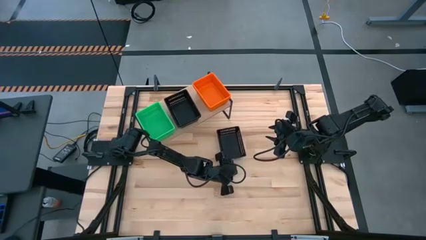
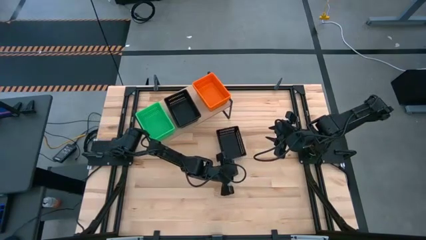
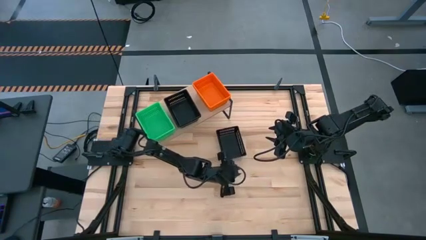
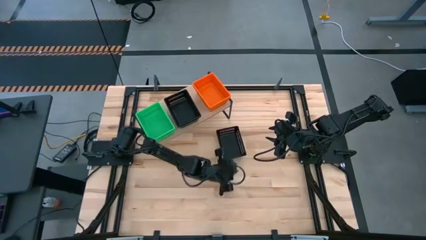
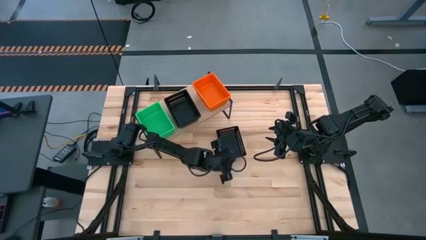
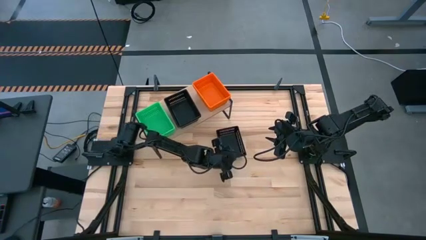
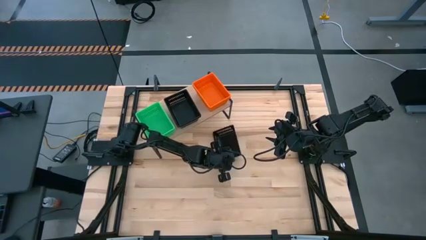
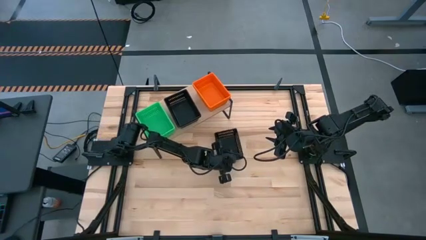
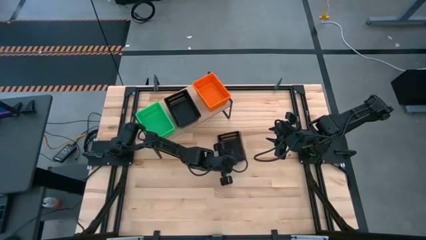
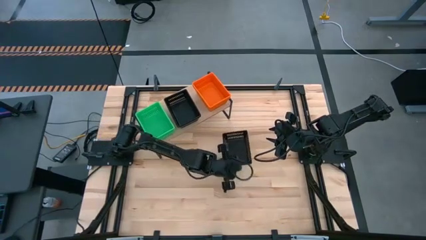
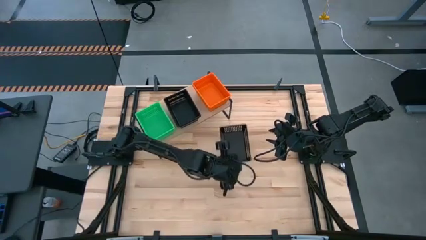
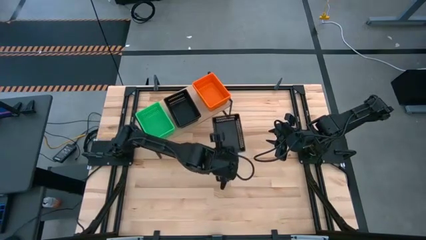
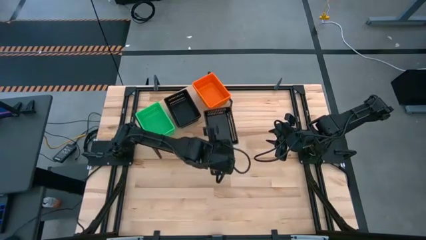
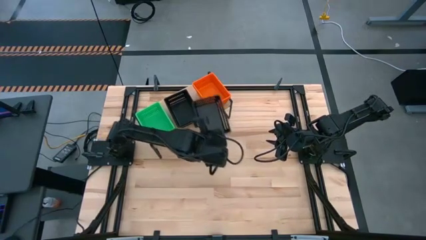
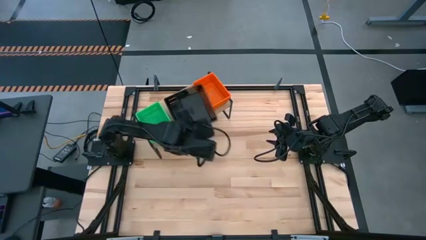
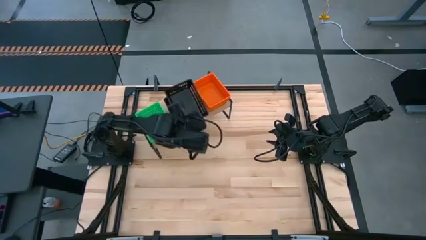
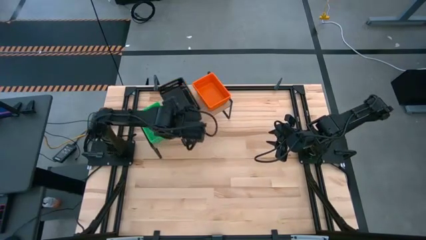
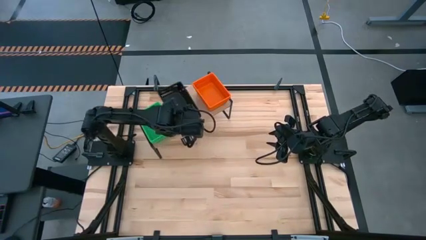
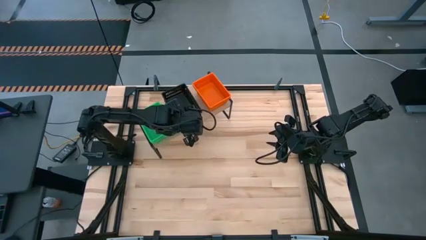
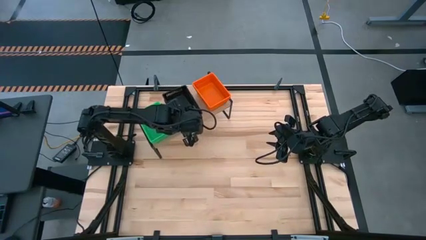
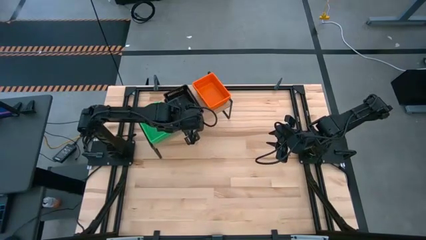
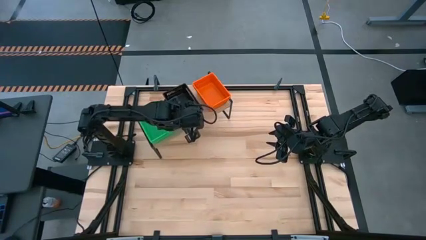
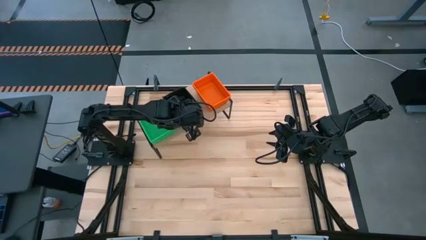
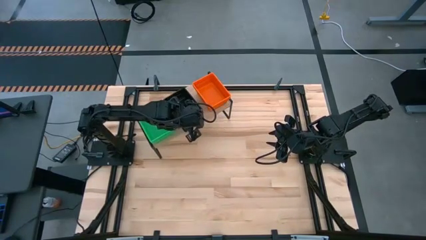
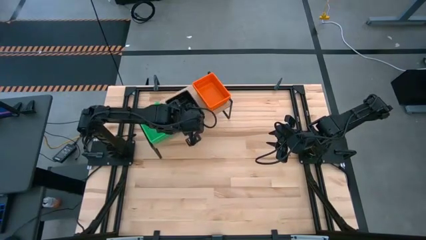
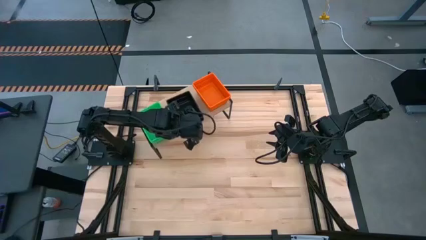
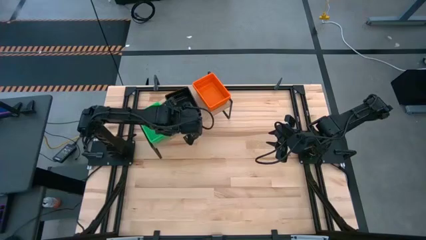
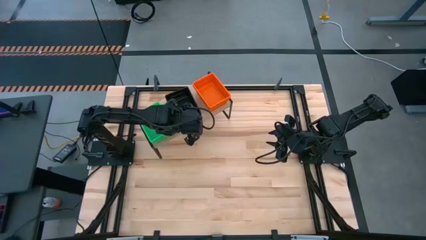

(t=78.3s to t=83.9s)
Task: Stack baskets on shelf by color
Stack the black basket on the black baskets on the shelf

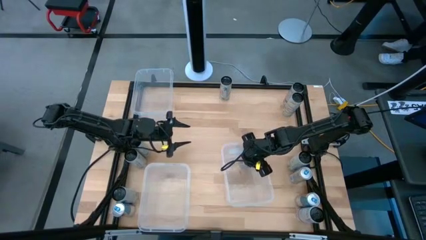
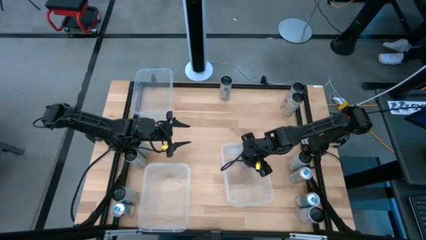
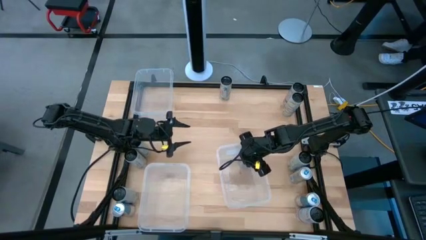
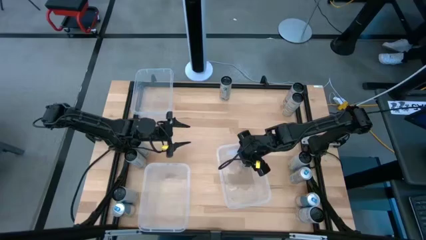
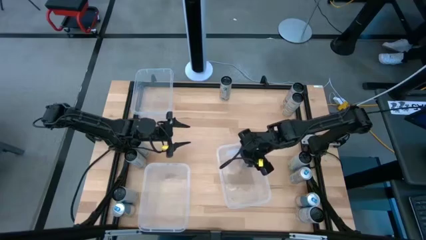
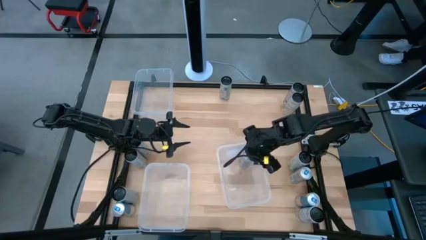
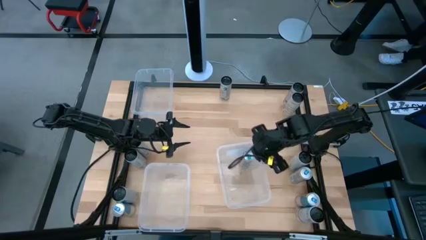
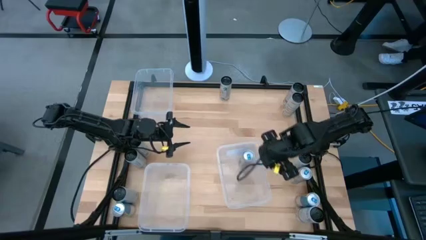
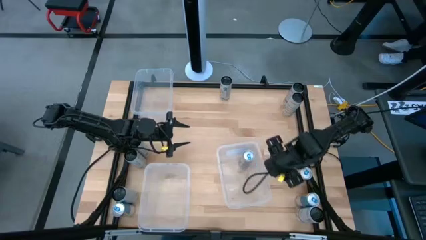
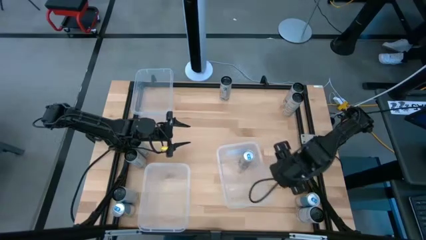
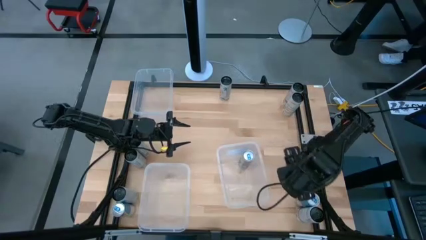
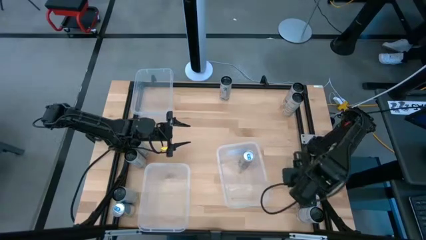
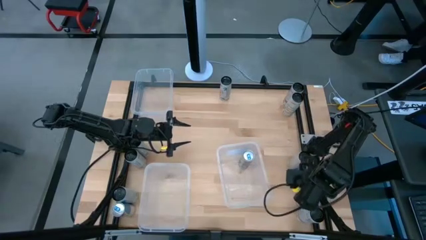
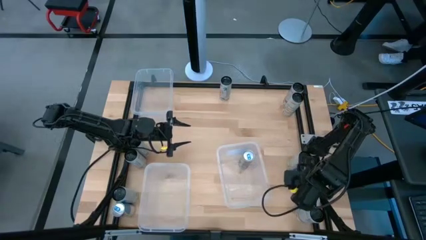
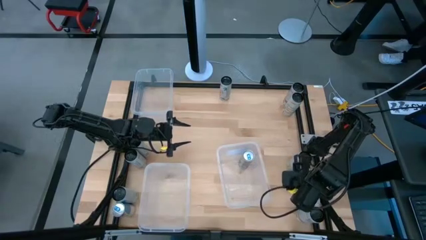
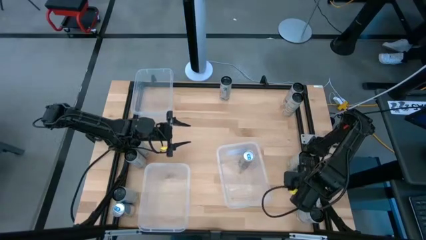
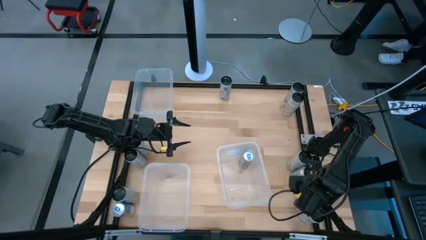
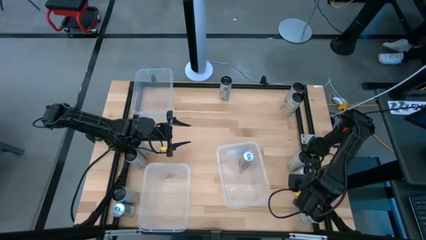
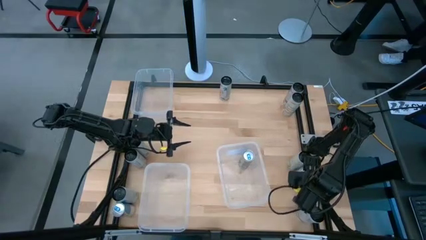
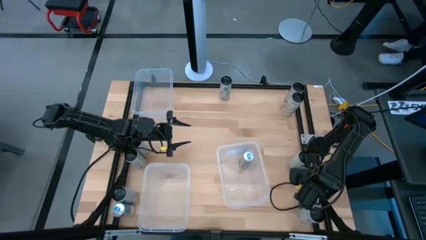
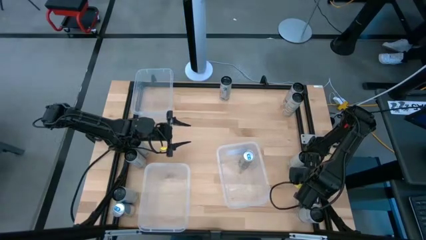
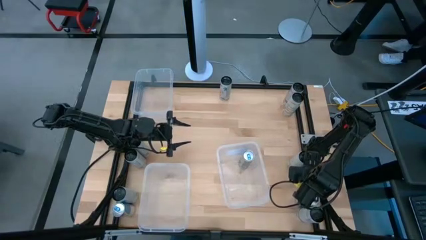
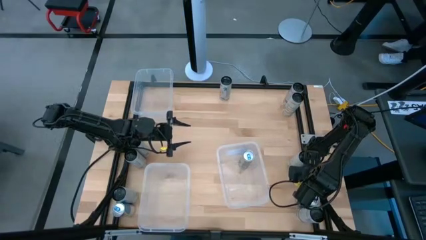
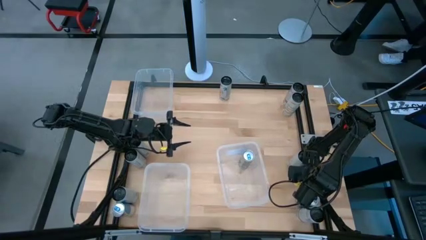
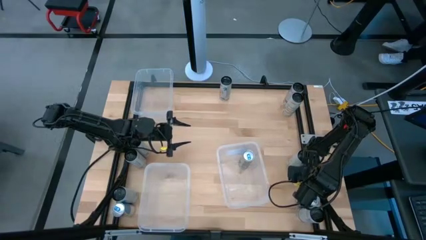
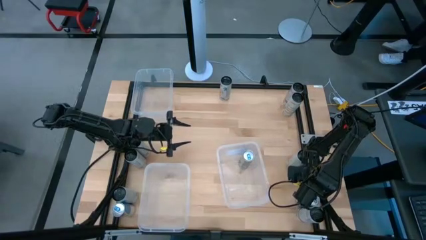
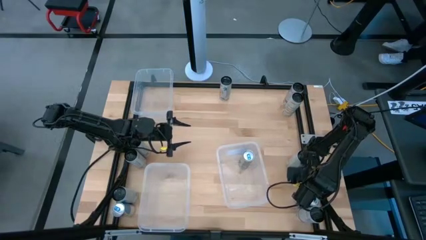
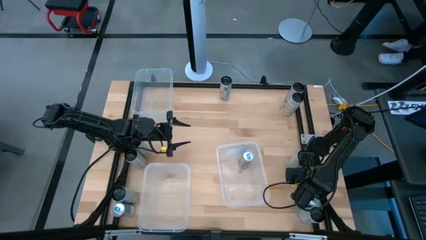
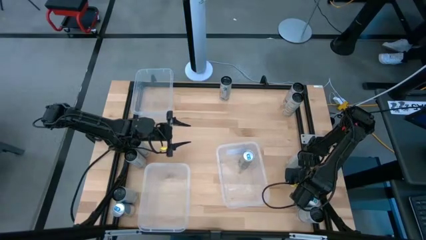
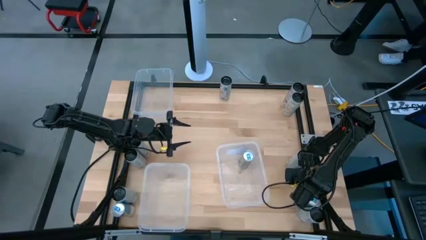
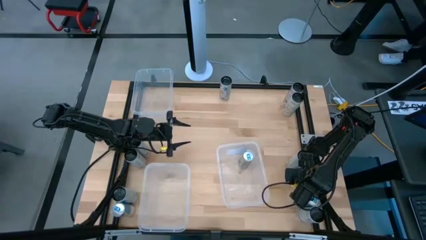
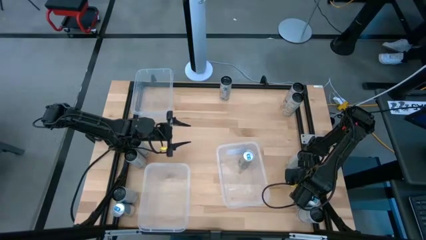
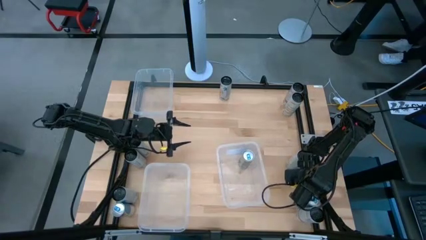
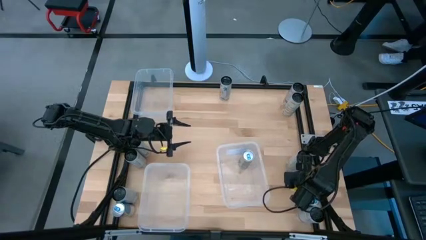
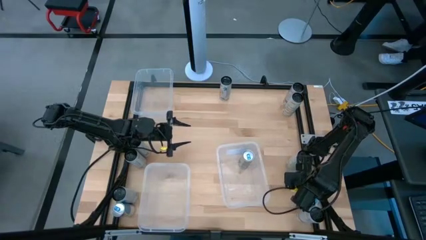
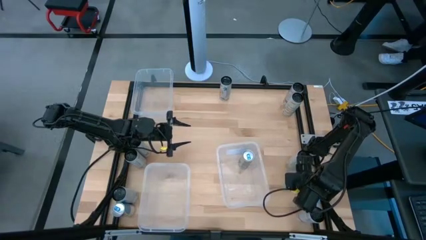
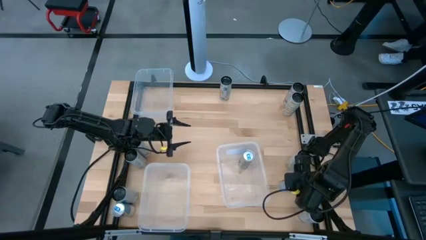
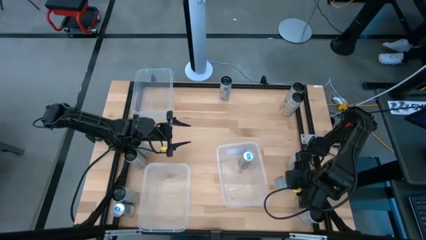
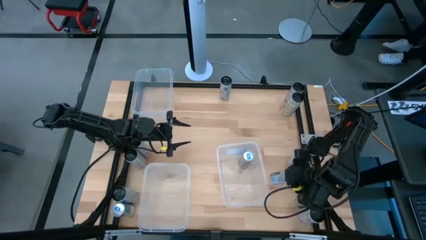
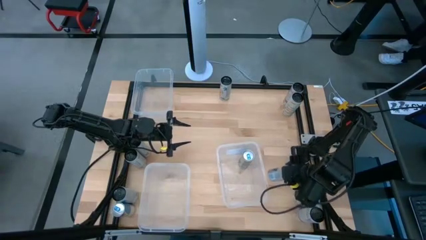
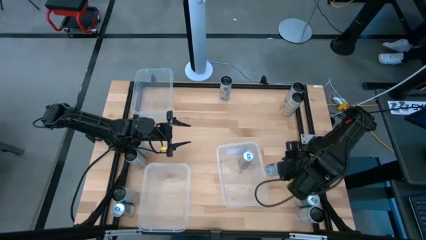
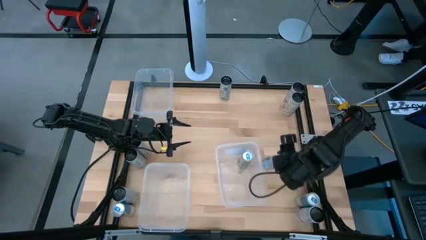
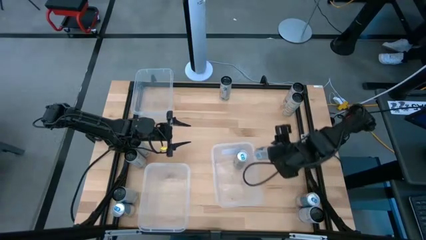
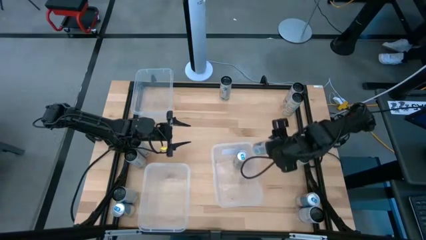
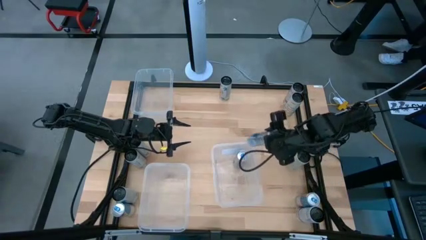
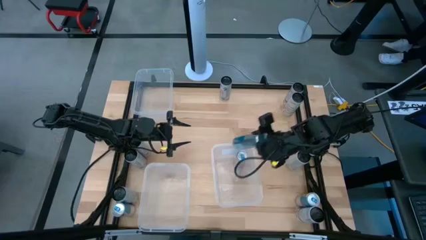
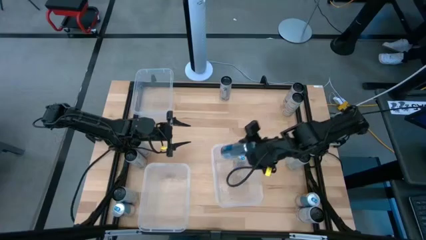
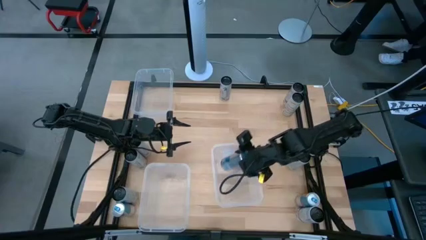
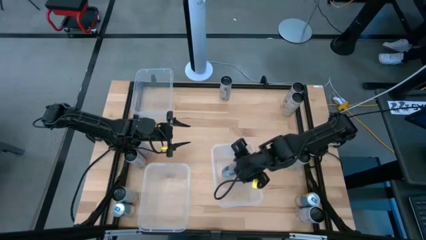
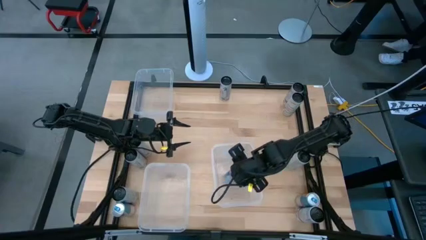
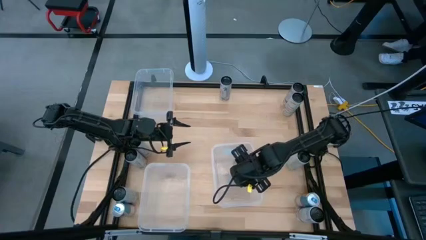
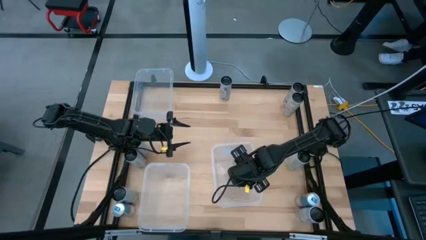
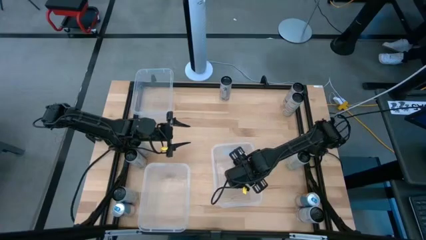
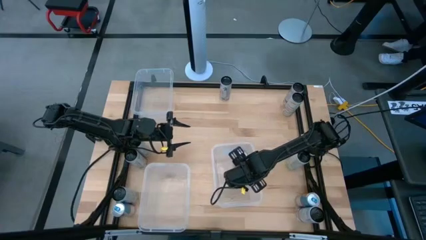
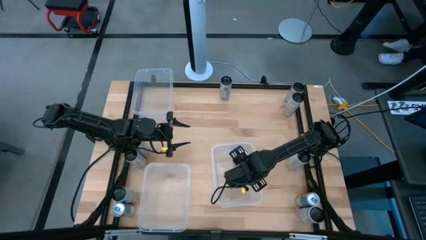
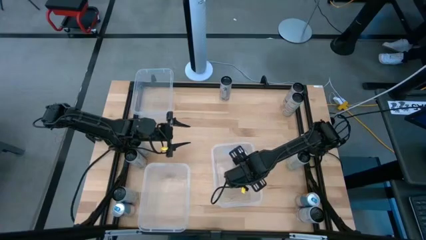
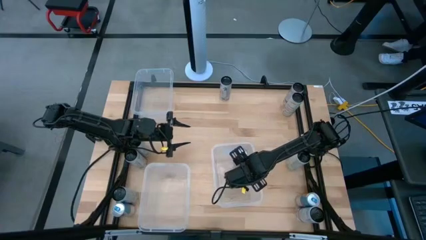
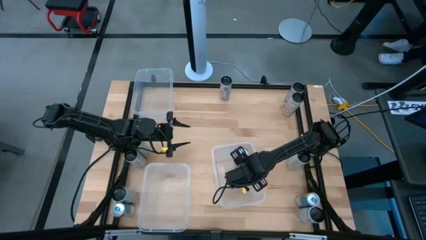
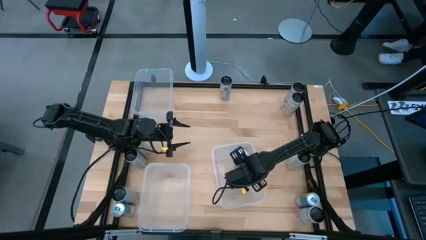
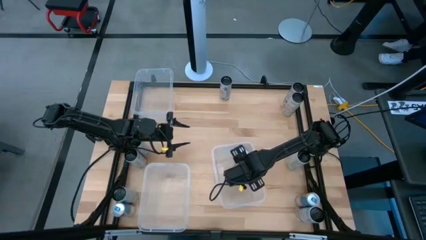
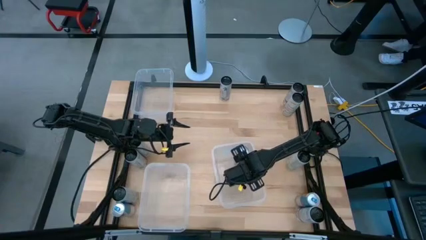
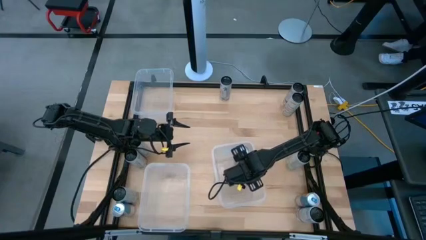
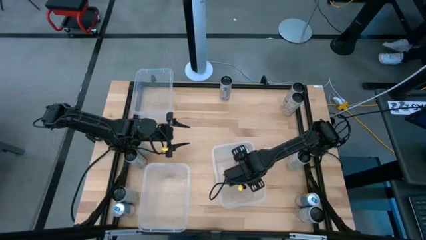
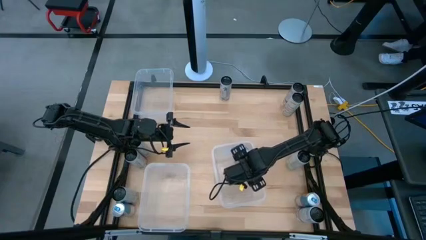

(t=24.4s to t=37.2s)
Task: Sort soda cans
Put the top right blue soda can into the bottom right transparent bin
